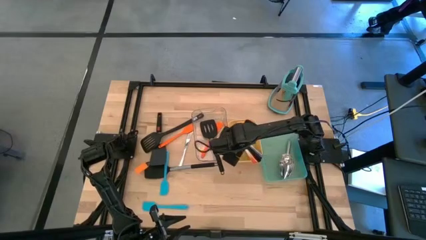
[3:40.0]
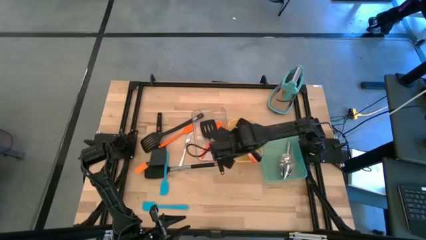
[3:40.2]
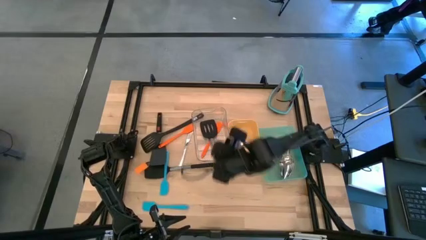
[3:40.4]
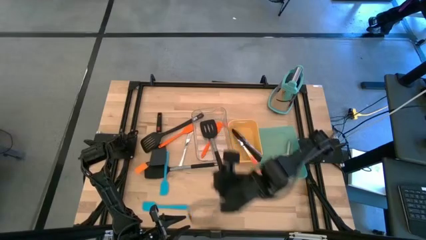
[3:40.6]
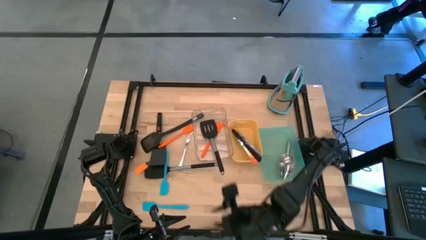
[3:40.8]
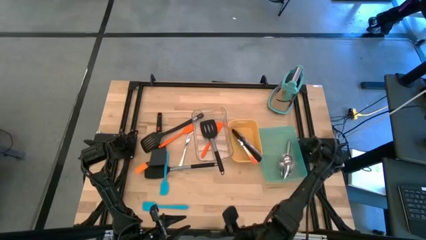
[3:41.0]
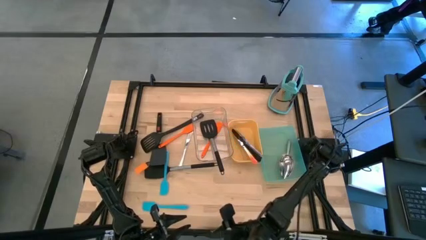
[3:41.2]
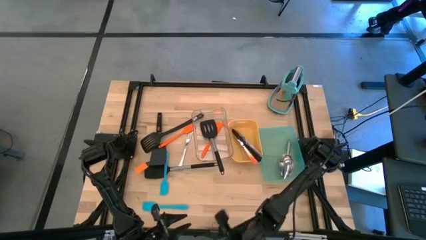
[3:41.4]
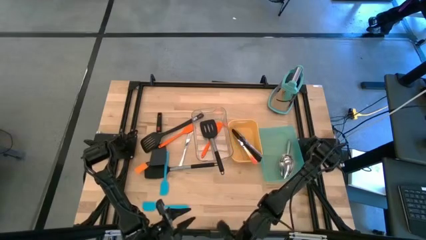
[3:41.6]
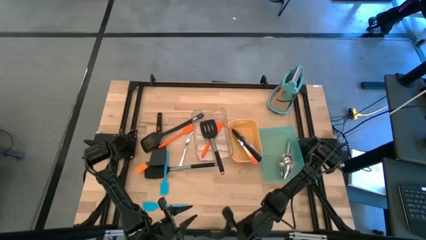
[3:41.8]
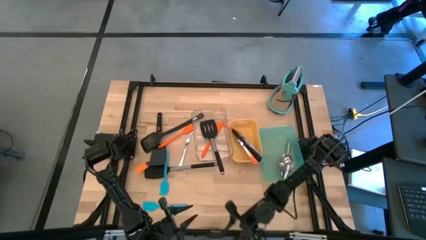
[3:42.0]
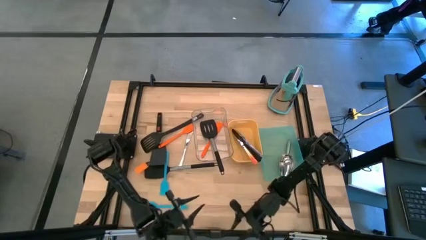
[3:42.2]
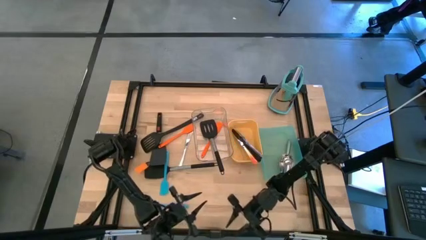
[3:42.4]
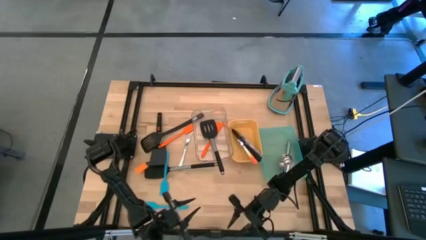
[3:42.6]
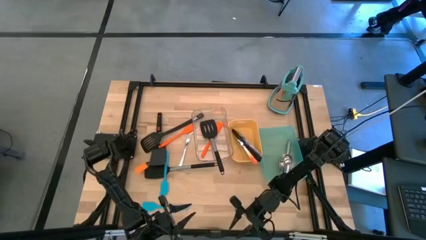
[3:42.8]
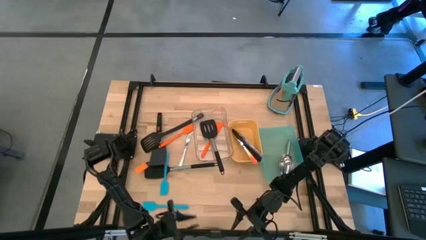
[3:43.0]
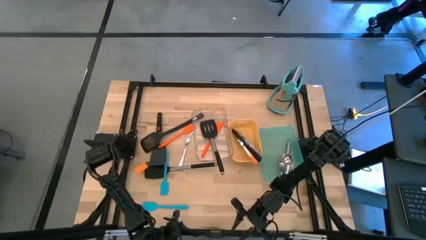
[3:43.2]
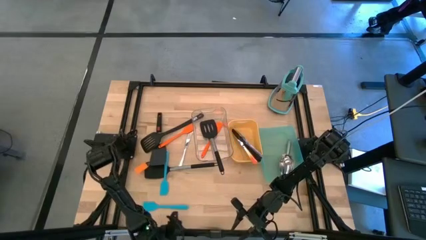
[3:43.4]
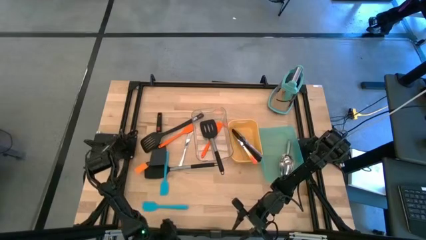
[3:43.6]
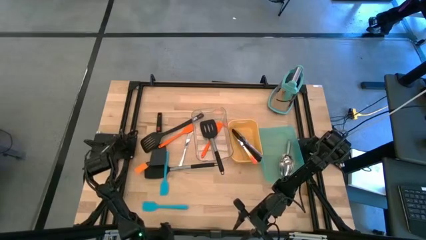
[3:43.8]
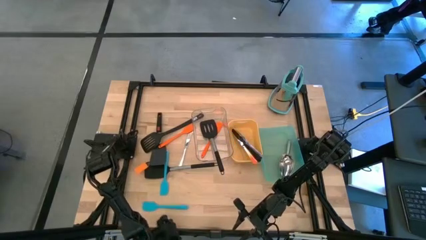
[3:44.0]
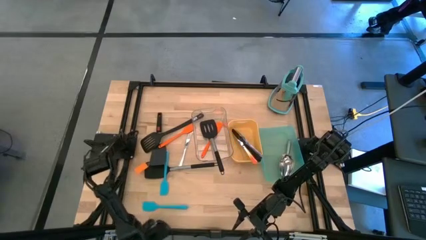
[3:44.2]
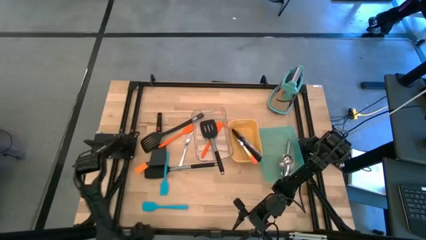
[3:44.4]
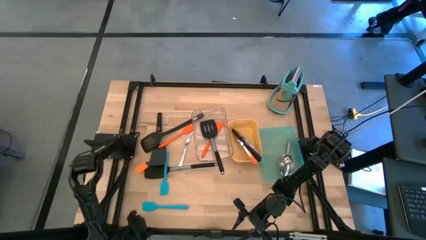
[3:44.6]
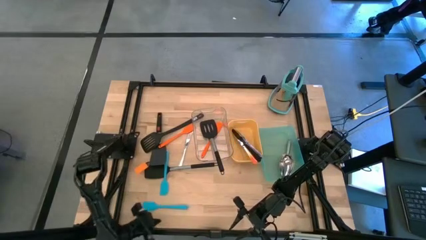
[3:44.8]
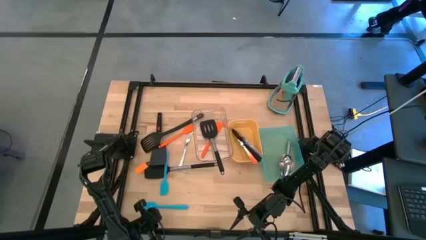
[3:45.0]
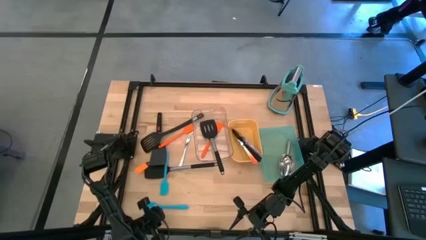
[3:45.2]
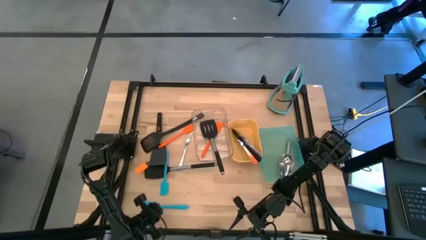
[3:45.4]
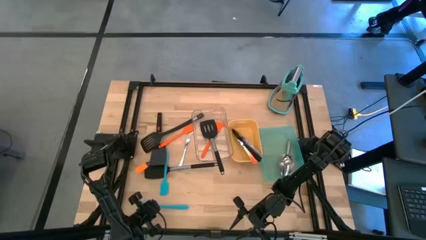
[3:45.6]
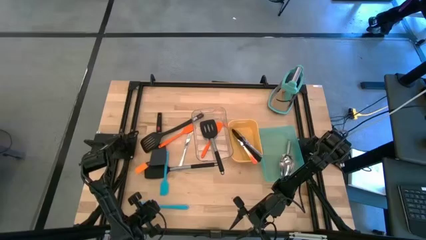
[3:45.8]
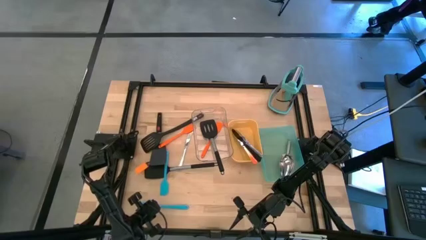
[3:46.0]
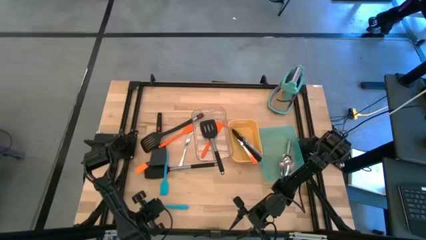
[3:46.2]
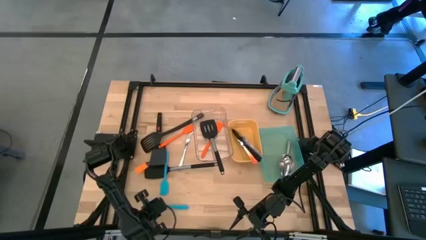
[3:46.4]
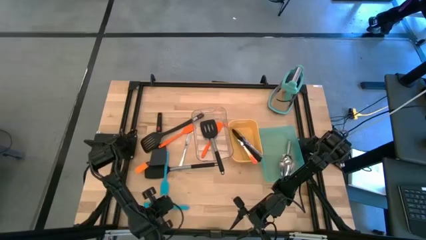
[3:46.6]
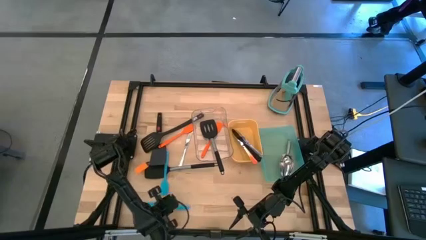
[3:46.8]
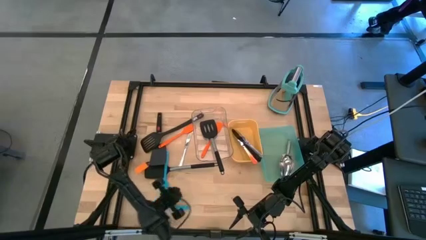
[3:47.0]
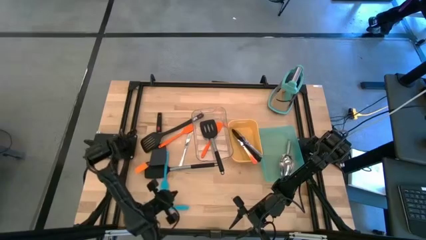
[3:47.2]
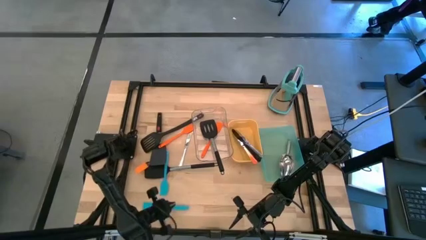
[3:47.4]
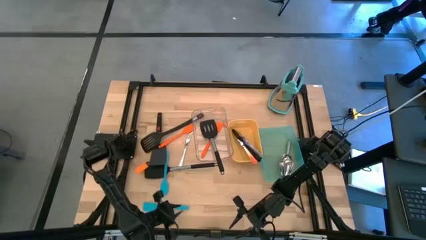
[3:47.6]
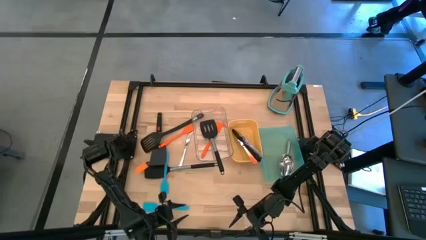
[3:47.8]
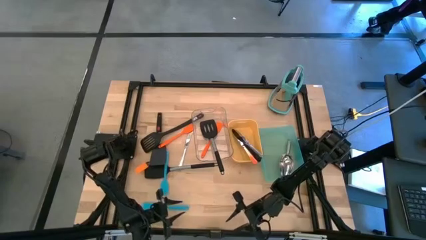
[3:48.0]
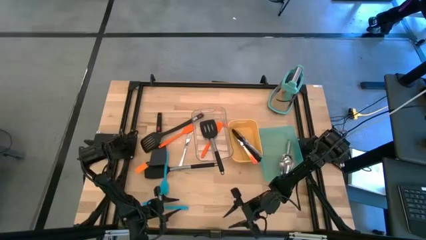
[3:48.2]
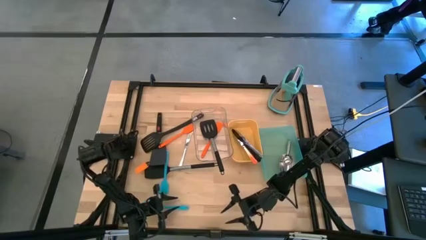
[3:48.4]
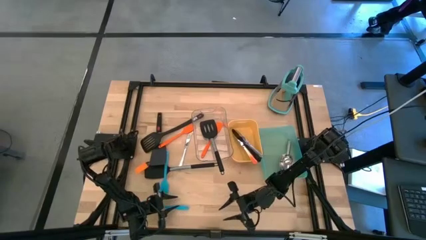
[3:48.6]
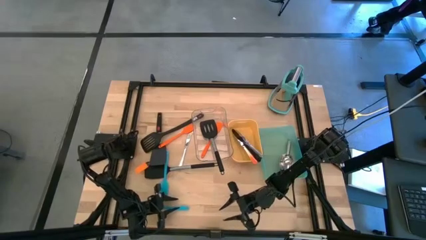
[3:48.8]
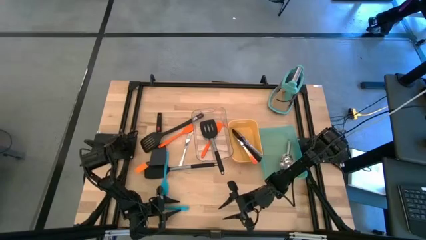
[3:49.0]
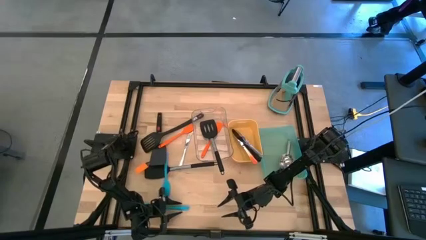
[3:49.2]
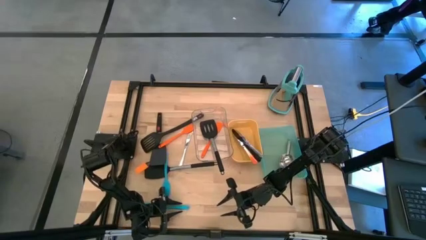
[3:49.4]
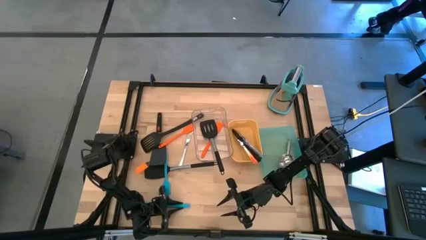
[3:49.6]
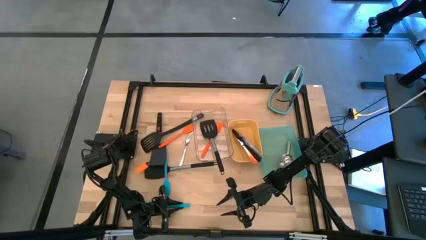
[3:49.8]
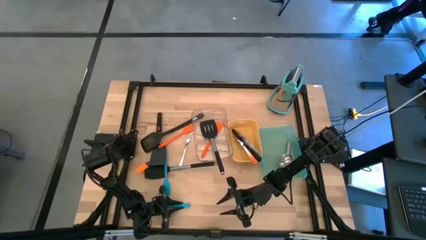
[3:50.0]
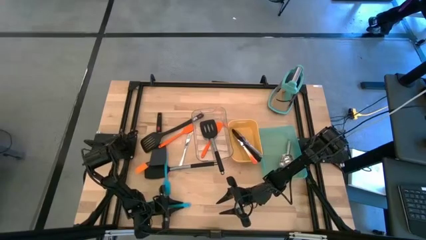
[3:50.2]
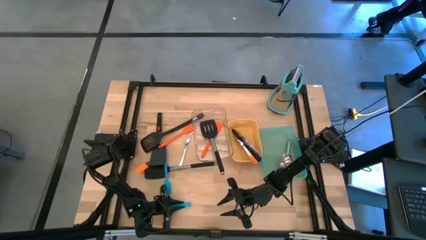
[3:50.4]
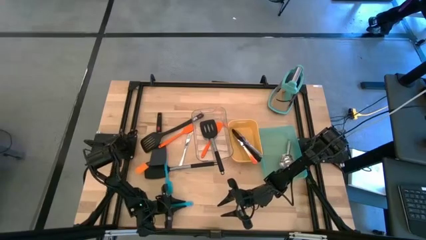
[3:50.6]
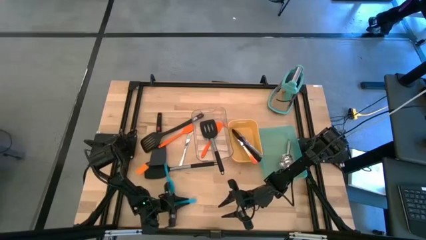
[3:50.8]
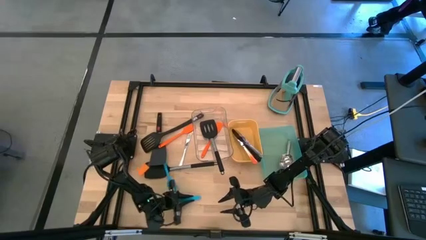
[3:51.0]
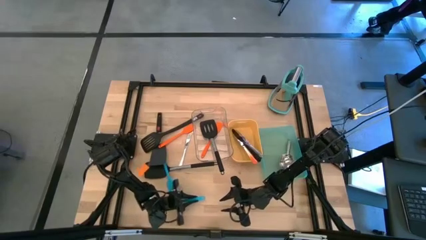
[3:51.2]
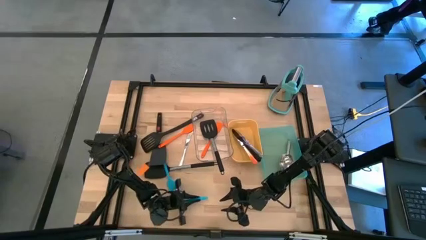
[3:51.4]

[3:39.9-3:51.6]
Task: Pick & Place Kitchen Items
Put the blue spatula into the transparent bin
